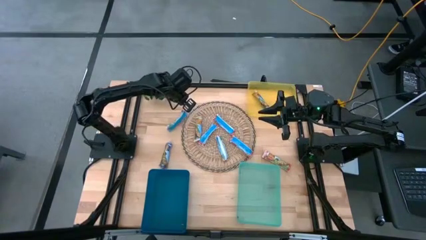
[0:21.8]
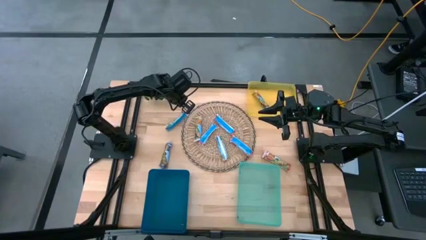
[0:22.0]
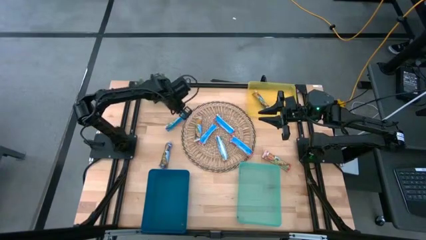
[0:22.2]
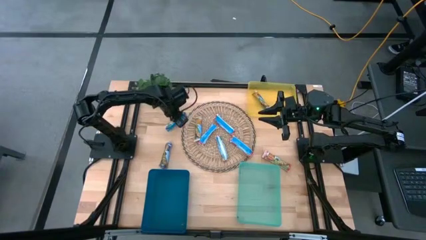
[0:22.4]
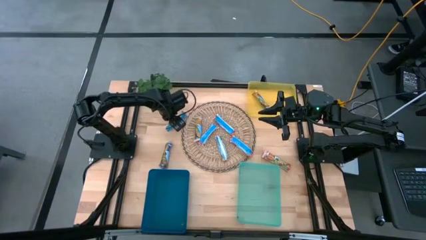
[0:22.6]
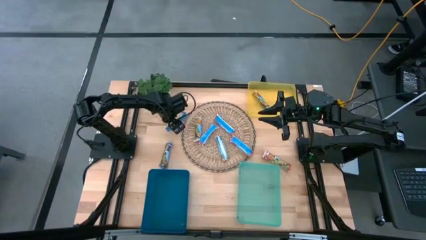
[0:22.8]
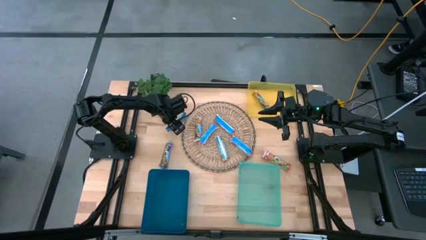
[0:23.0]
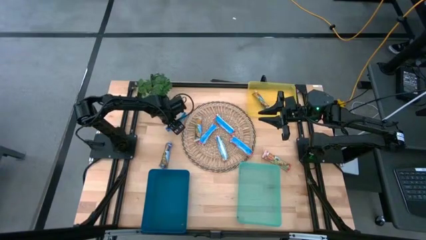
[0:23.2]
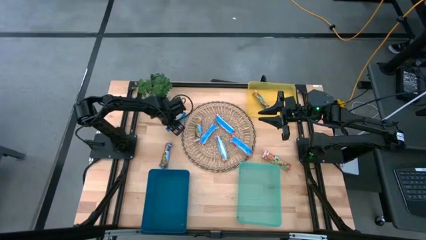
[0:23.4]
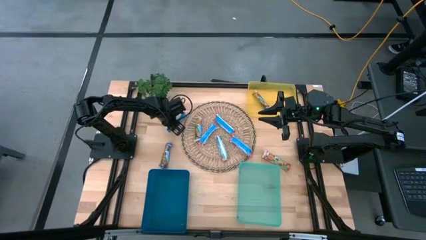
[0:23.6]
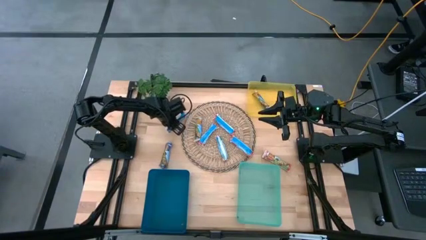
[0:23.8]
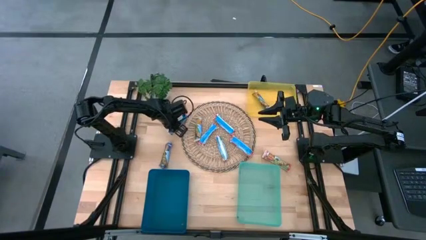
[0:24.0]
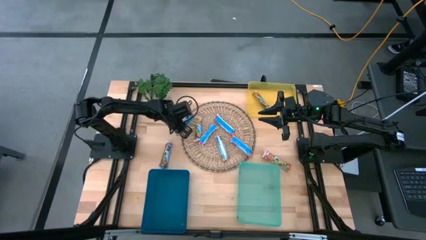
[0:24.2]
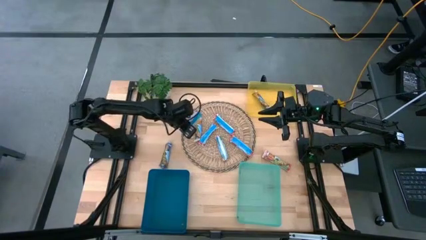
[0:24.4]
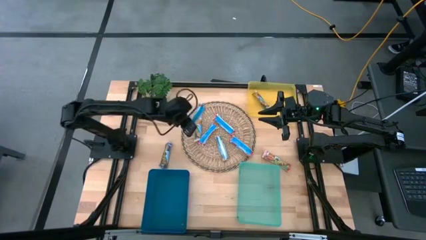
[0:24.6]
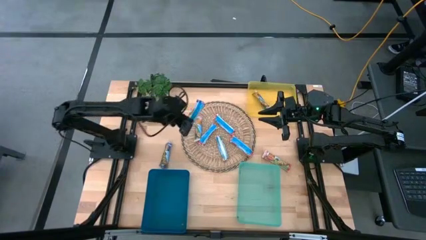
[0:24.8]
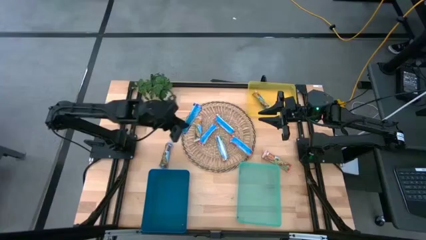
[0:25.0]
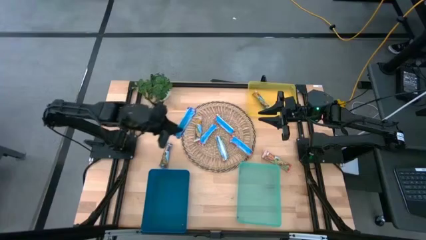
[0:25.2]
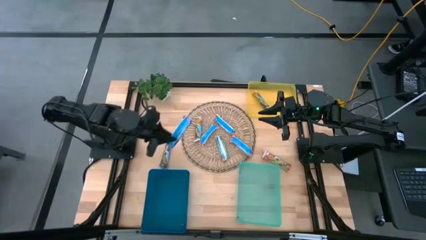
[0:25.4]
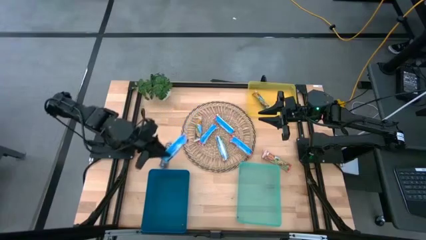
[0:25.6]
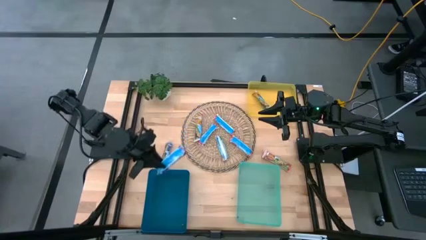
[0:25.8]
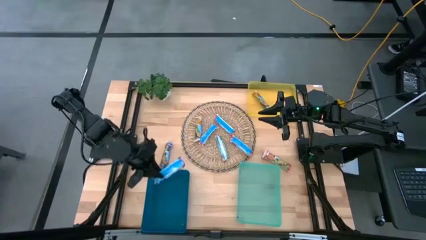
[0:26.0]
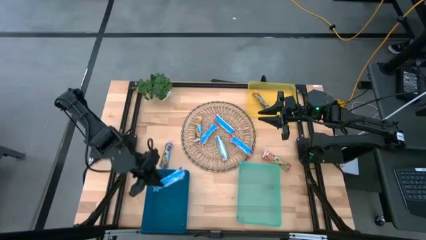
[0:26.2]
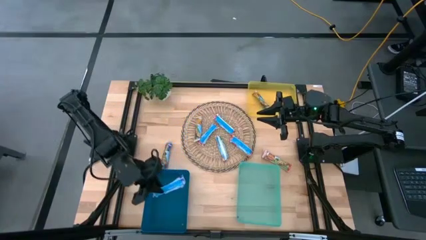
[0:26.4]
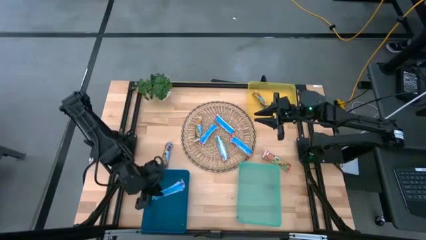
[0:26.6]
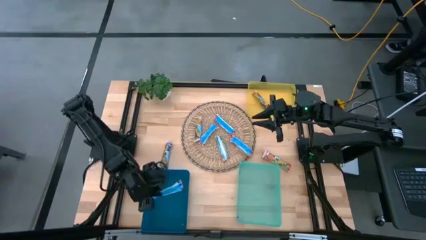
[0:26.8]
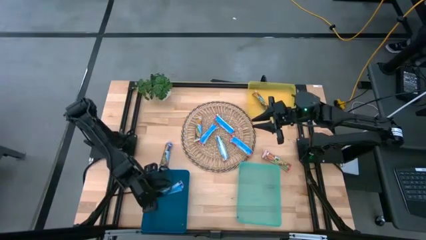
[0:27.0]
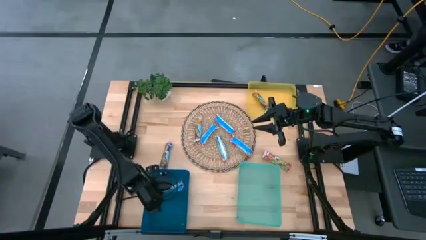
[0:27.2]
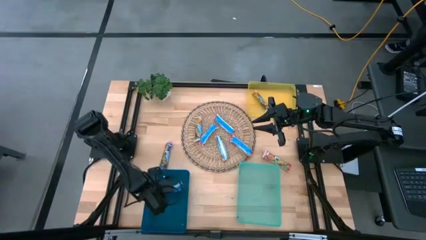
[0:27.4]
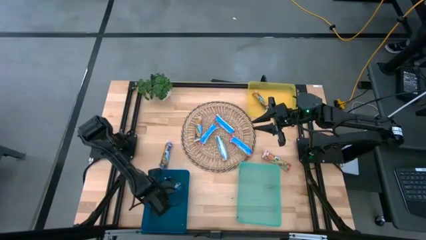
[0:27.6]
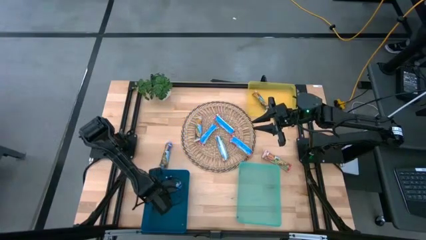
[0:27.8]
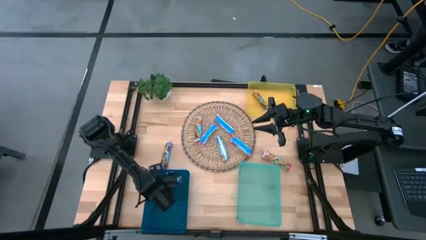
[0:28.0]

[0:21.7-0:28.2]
Task: Pick and place Granola Bars by type
Put the blue granola bar into the blue bin

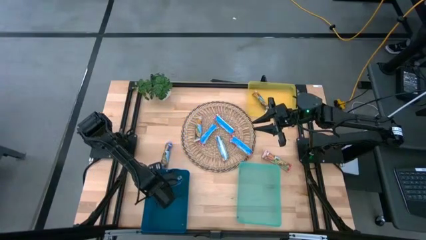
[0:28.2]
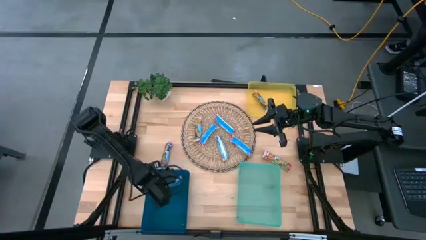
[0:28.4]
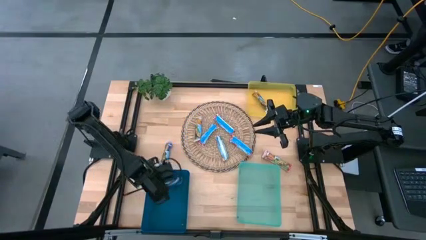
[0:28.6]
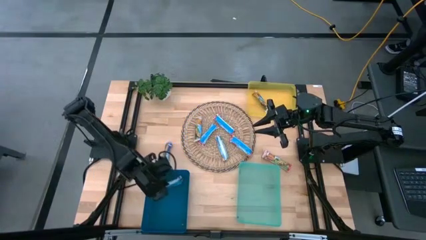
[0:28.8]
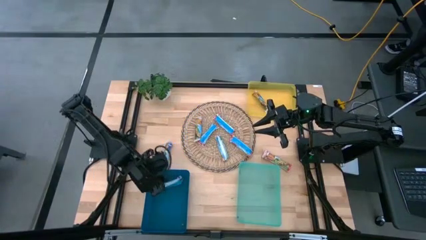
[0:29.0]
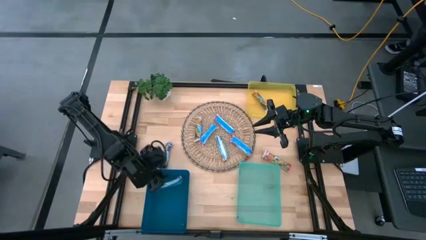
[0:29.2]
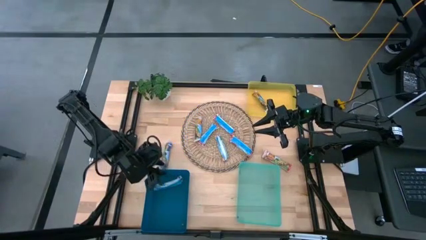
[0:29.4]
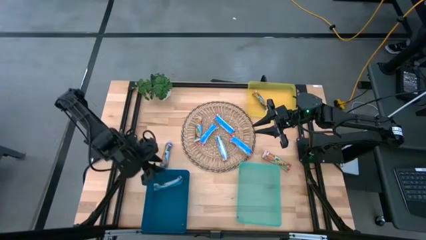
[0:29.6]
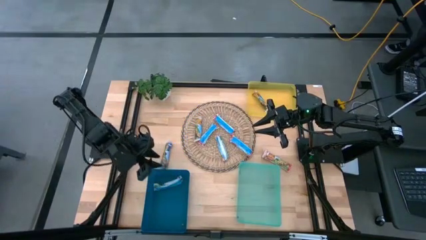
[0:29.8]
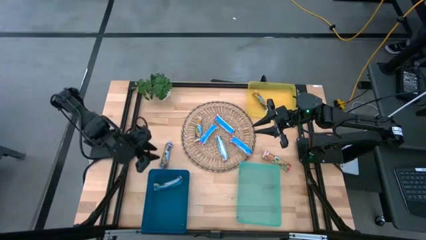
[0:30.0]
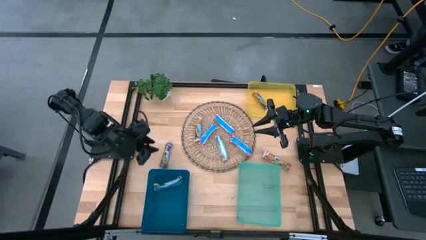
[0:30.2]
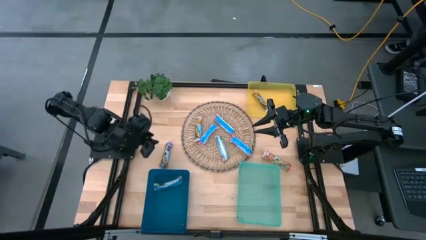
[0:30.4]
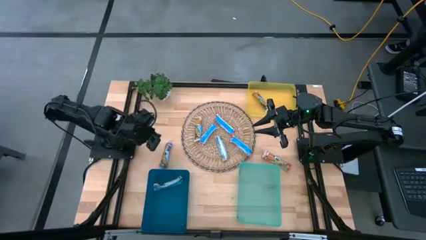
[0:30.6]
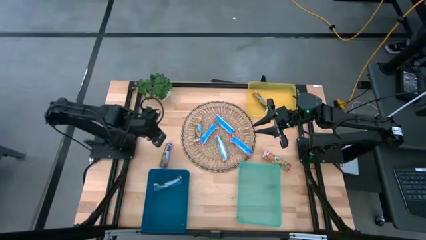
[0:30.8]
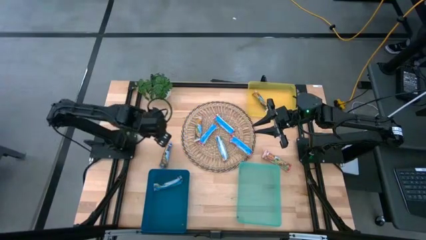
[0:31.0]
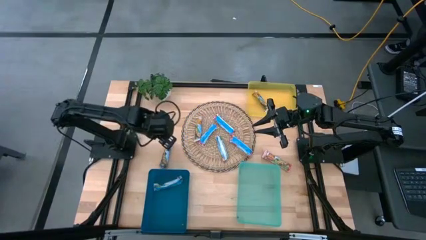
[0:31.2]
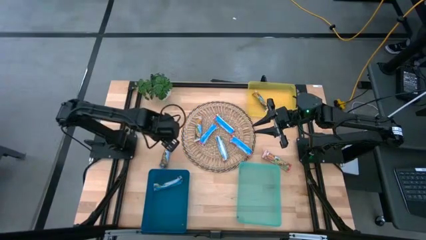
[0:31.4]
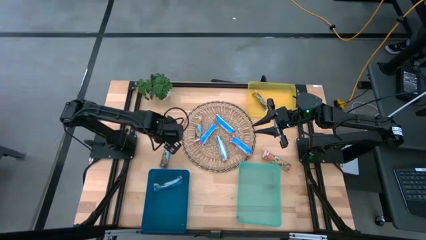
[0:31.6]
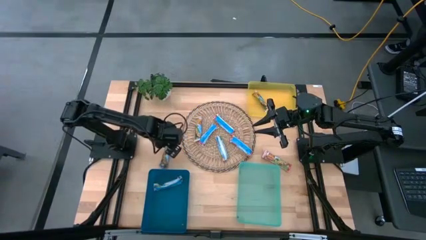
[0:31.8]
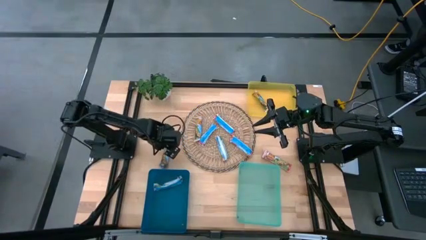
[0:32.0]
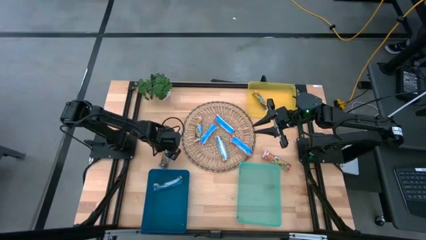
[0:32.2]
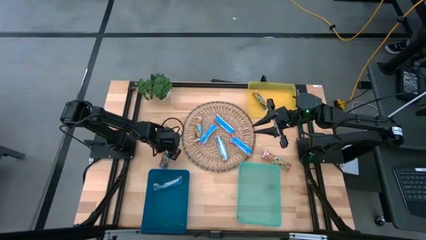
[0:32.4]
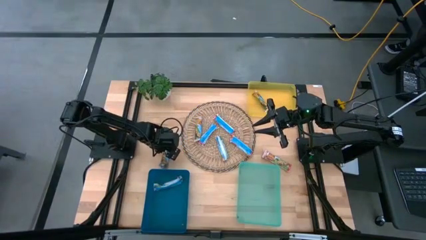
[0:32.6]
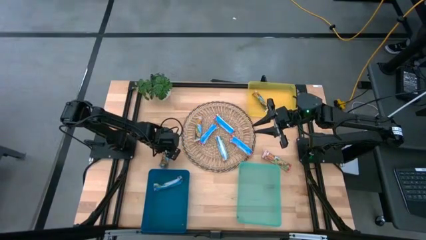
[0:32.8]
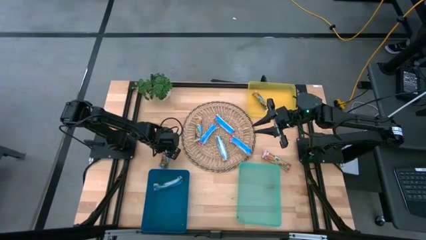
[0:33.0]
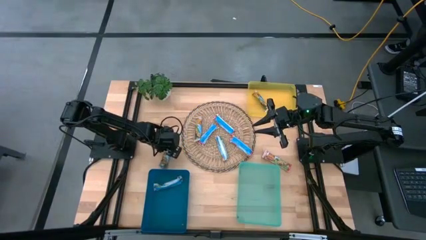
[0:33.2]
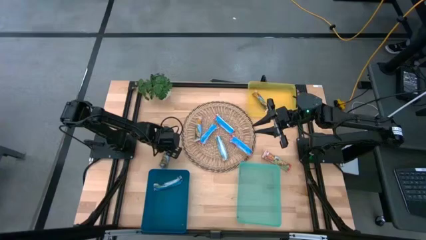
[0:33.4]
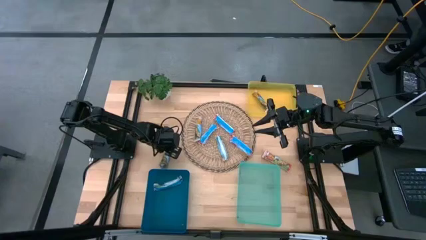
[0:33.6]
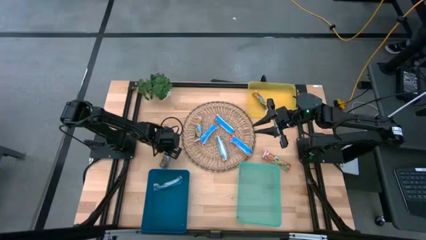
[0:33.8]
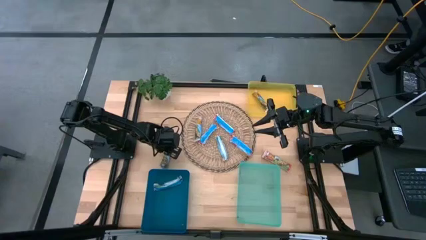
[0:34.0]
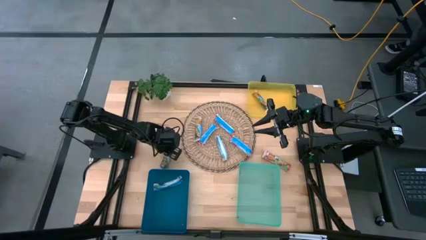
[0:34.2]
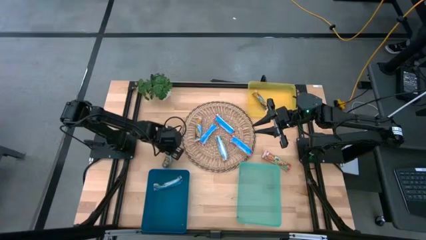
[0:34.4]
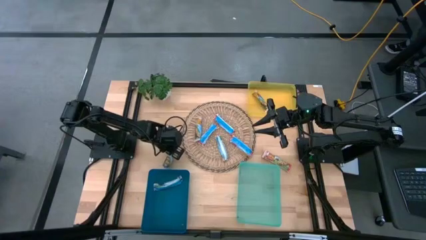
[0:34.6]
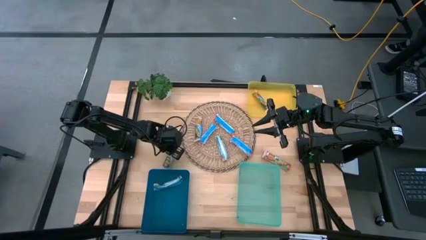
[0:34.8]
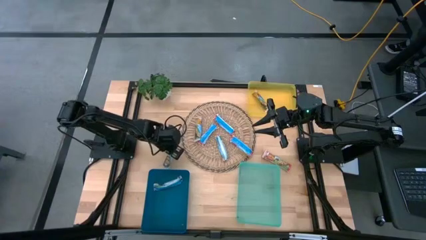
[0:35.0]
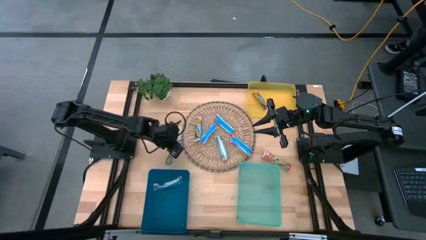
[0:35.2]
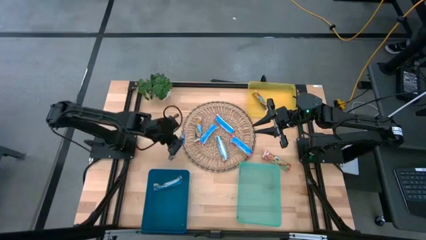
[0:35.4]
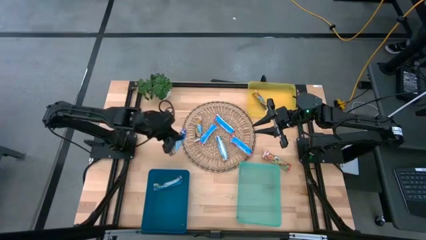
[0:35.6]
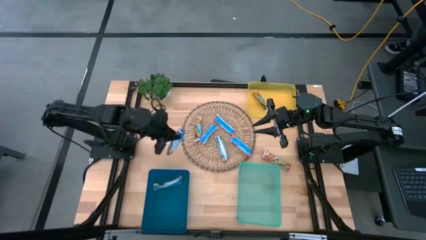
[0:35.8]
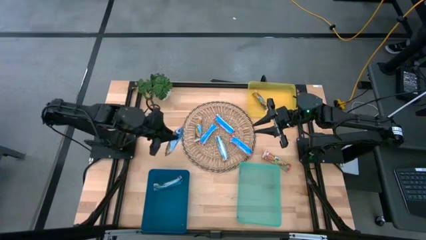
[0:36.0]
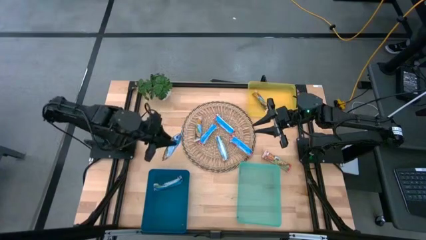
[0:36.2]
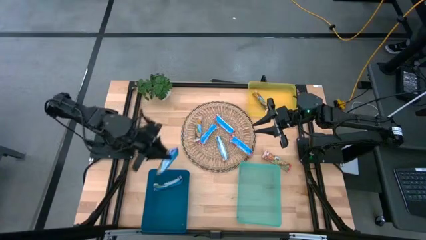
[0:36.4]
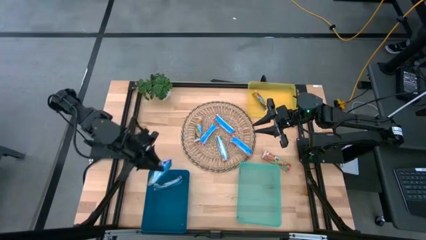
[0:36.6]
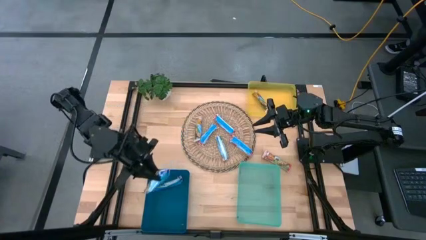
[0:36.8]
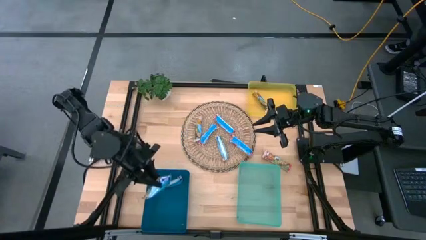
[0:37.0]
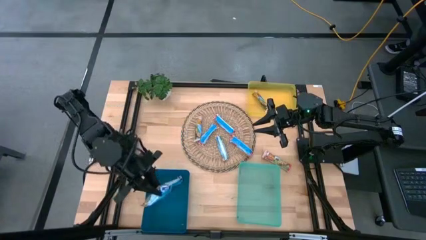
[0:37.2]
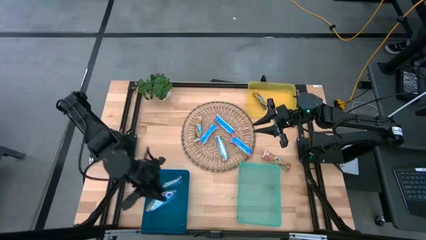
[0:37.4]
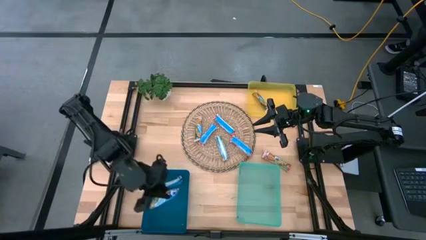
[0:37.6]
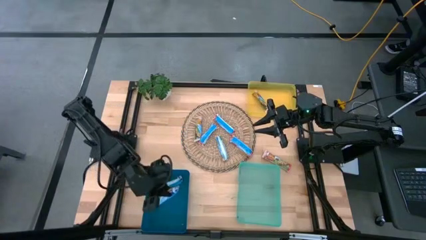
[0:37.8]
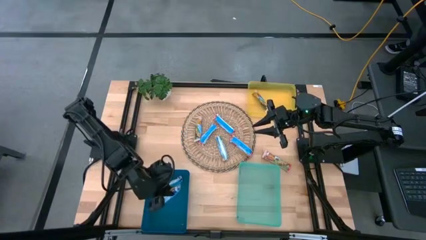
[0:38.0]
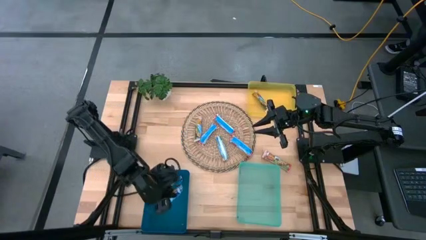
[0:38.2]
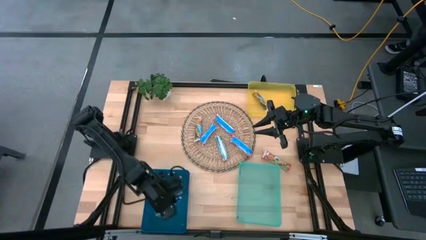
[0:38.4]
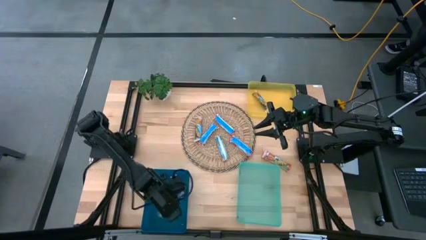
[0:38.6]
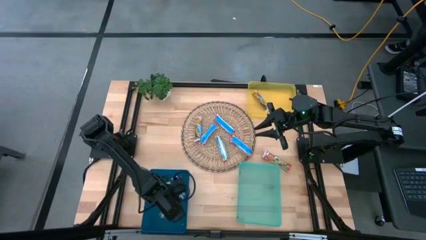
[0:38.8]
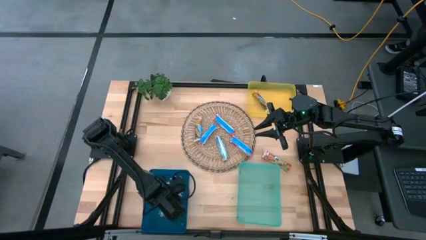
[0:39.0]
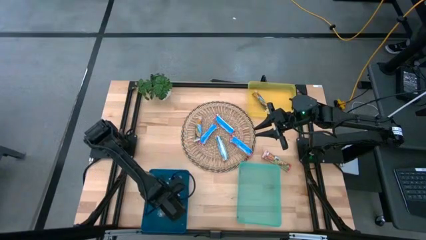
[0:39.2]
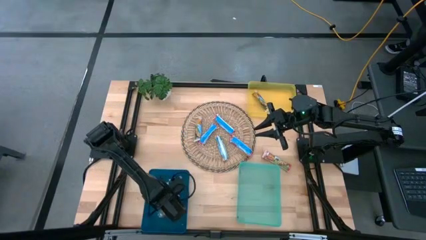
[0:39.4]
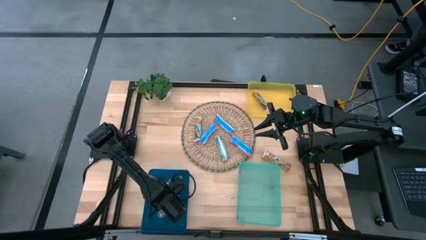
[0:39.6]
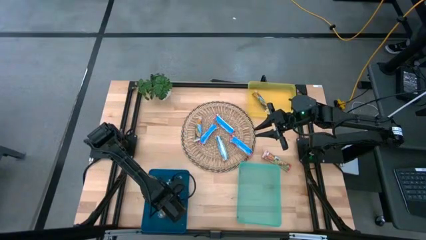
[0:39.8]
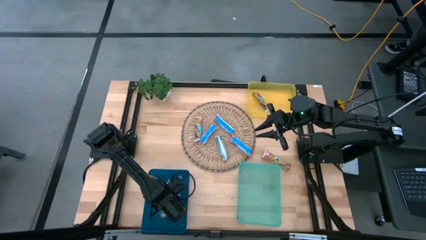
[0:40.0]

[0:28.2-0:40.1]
Put the blue granola bar into the blue bin
